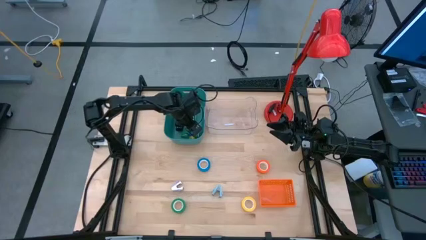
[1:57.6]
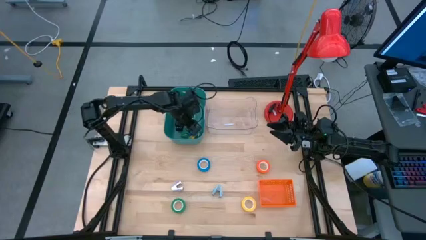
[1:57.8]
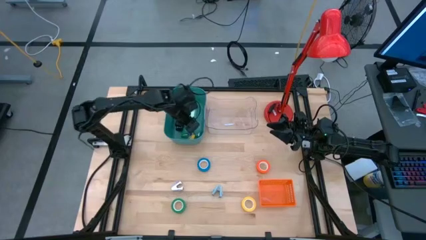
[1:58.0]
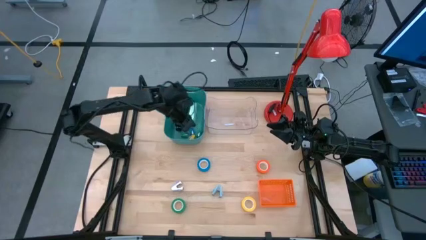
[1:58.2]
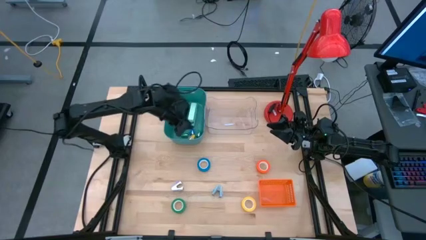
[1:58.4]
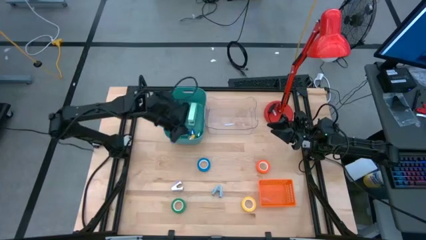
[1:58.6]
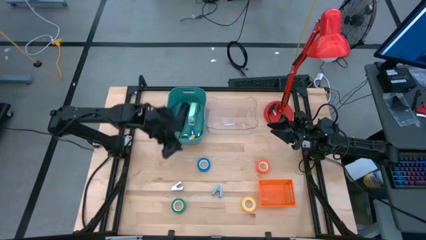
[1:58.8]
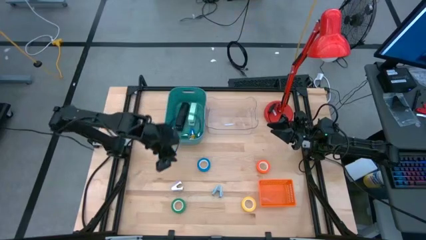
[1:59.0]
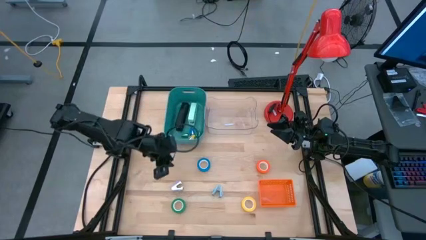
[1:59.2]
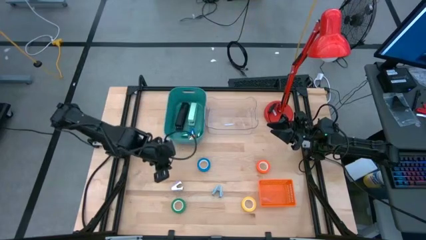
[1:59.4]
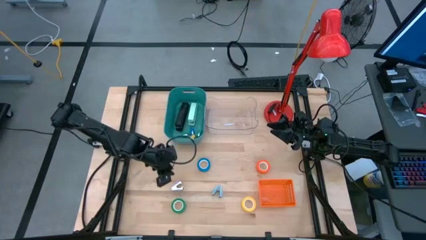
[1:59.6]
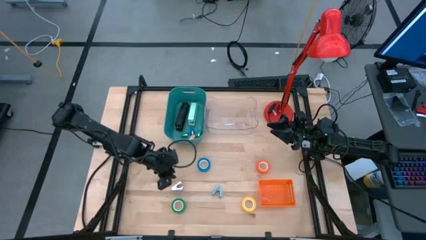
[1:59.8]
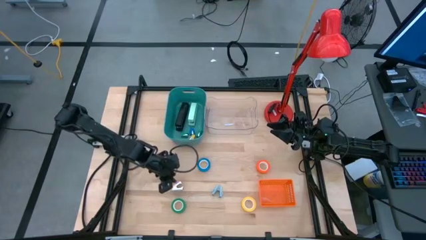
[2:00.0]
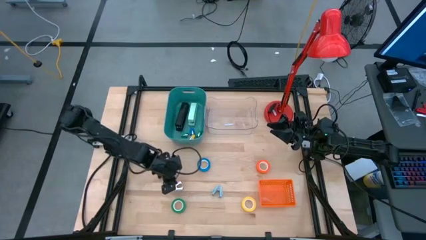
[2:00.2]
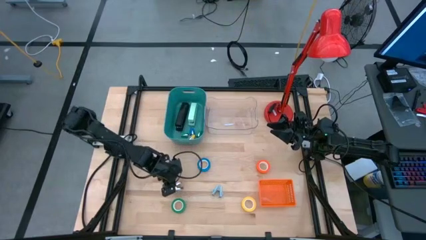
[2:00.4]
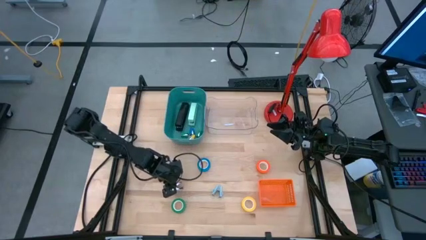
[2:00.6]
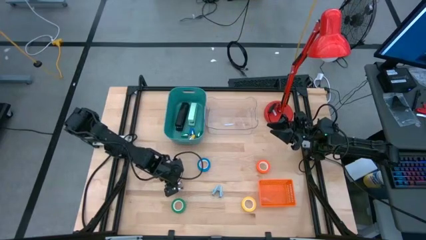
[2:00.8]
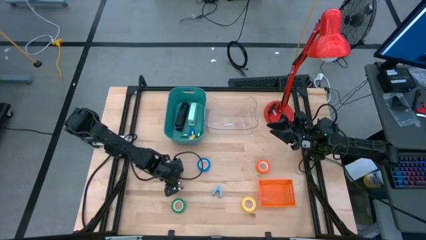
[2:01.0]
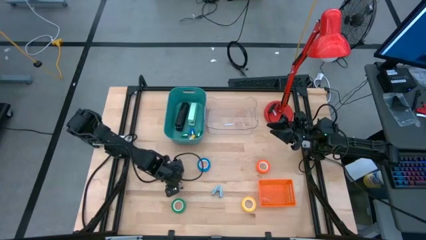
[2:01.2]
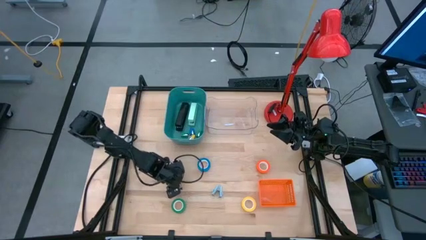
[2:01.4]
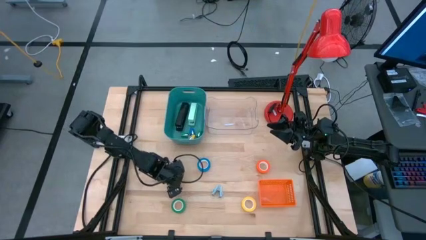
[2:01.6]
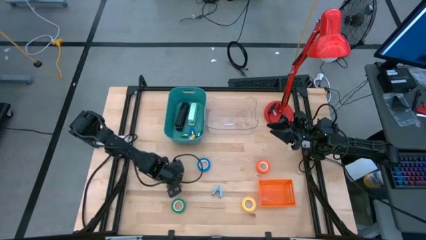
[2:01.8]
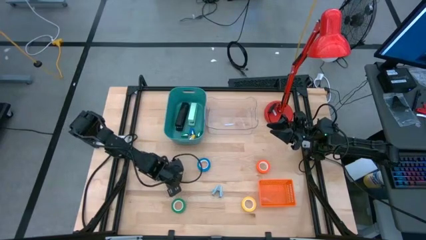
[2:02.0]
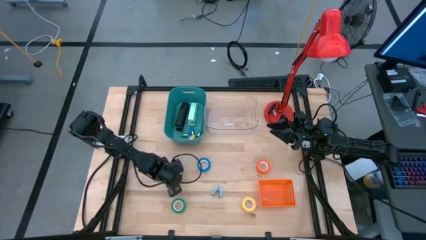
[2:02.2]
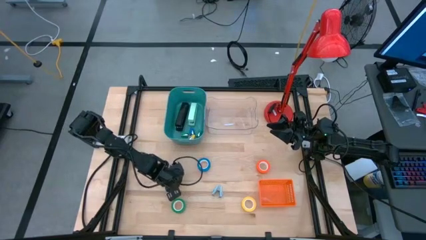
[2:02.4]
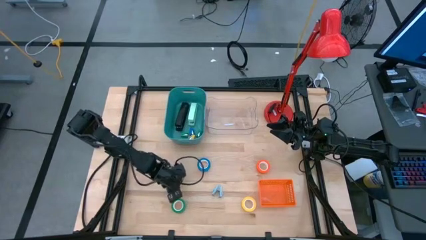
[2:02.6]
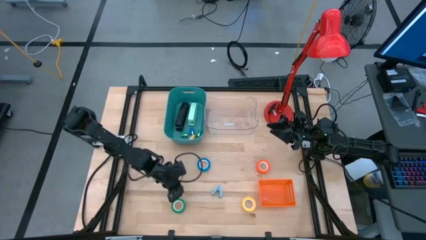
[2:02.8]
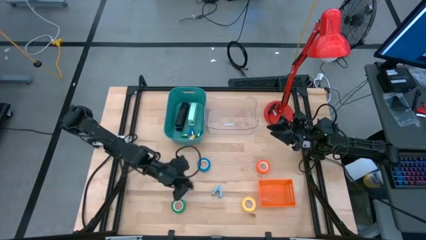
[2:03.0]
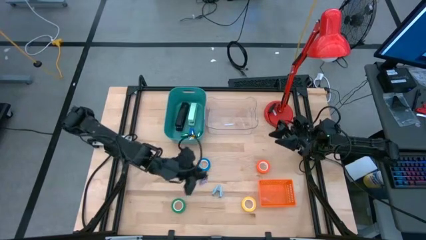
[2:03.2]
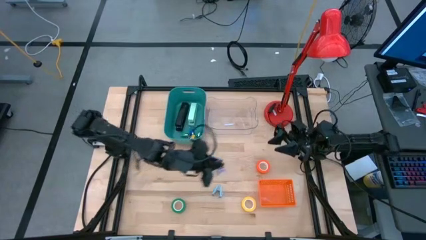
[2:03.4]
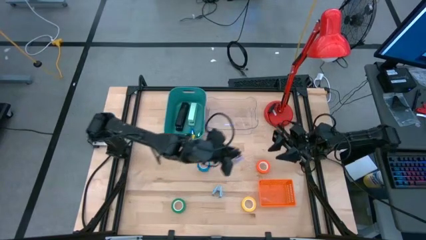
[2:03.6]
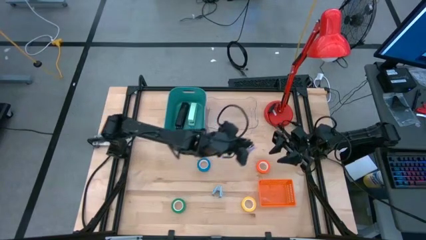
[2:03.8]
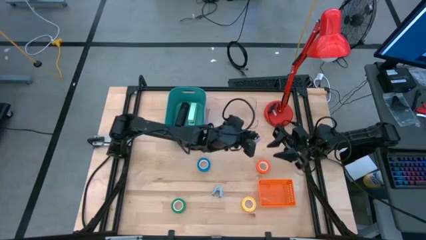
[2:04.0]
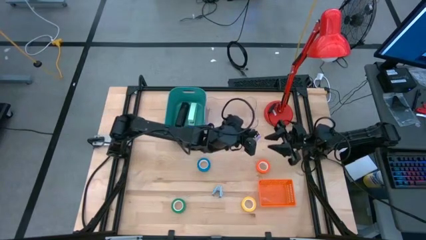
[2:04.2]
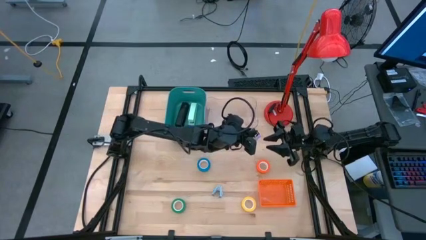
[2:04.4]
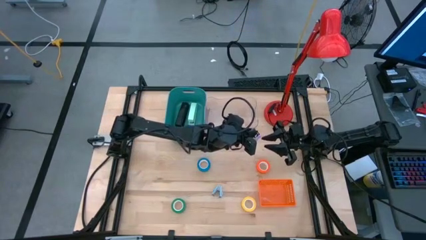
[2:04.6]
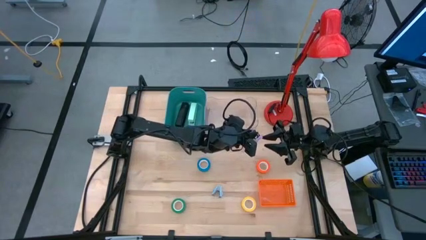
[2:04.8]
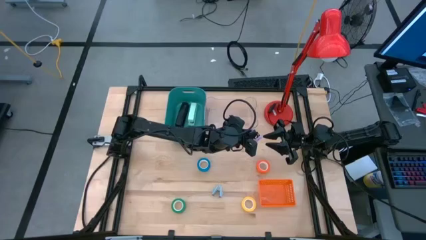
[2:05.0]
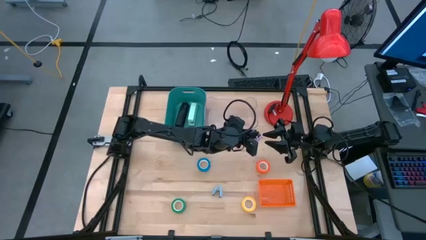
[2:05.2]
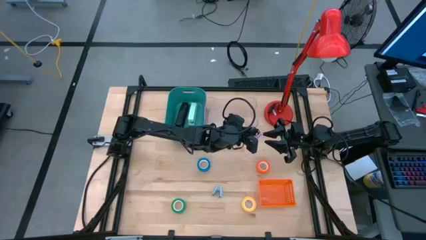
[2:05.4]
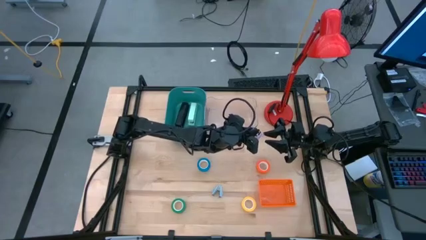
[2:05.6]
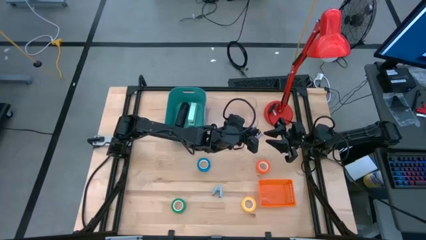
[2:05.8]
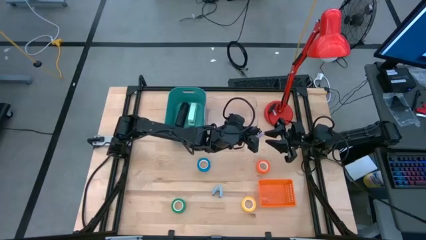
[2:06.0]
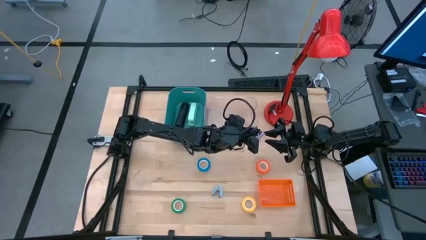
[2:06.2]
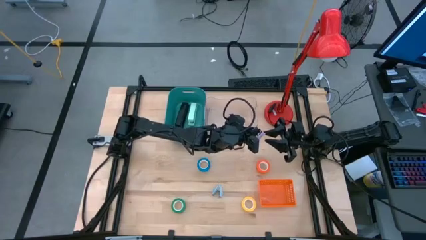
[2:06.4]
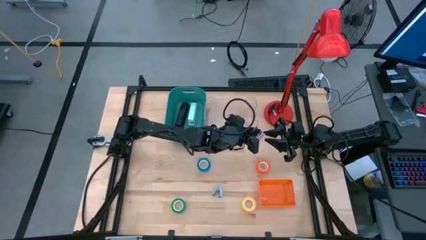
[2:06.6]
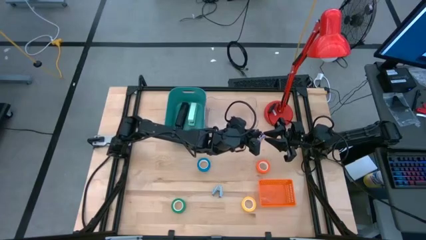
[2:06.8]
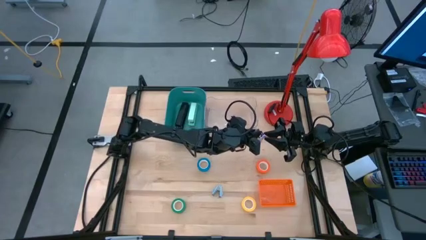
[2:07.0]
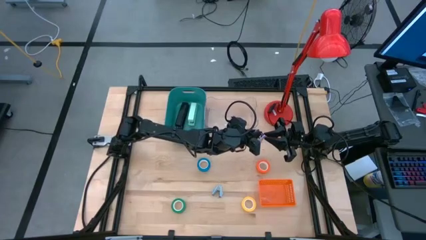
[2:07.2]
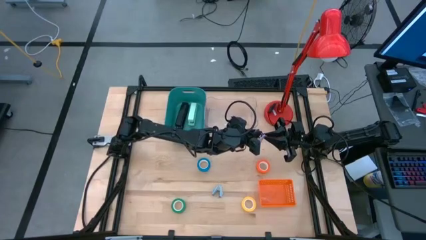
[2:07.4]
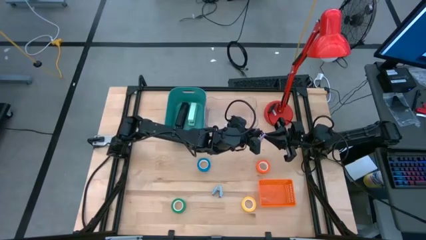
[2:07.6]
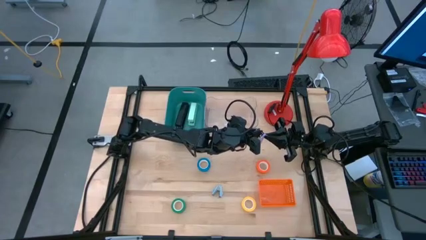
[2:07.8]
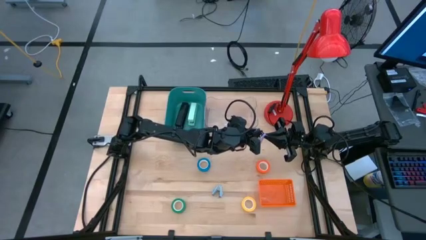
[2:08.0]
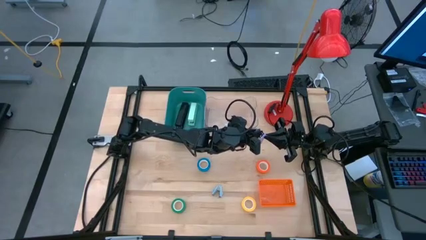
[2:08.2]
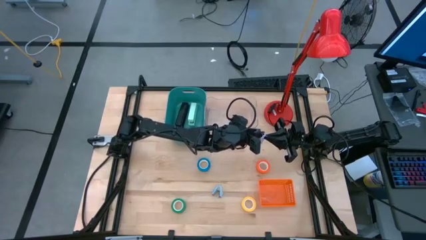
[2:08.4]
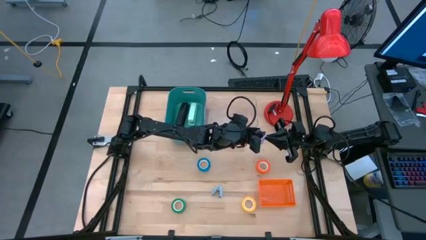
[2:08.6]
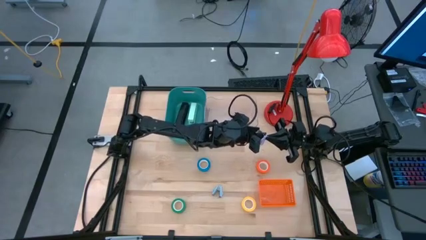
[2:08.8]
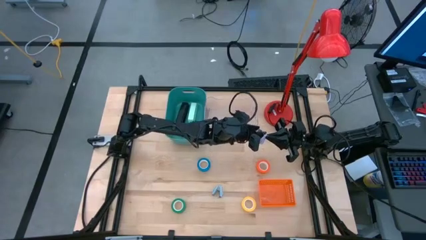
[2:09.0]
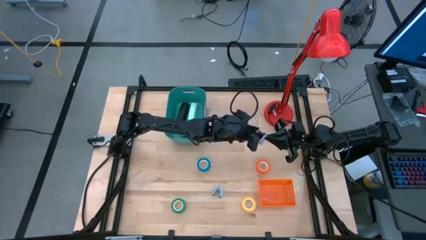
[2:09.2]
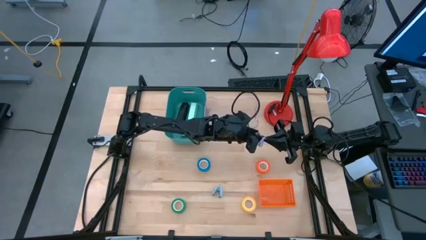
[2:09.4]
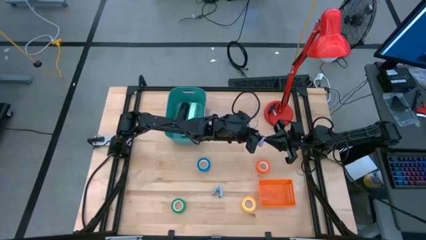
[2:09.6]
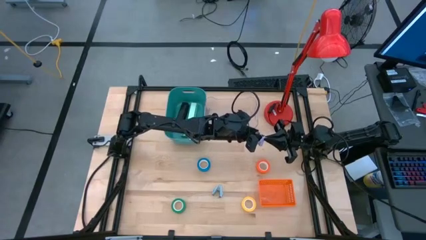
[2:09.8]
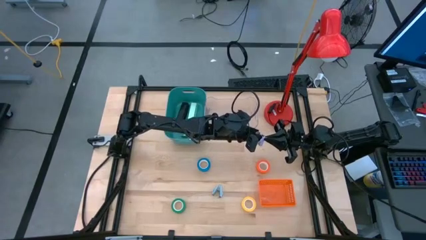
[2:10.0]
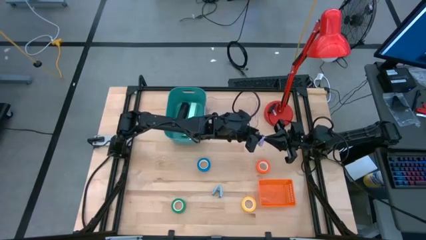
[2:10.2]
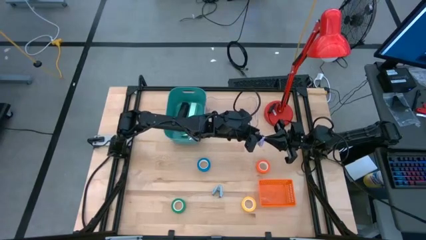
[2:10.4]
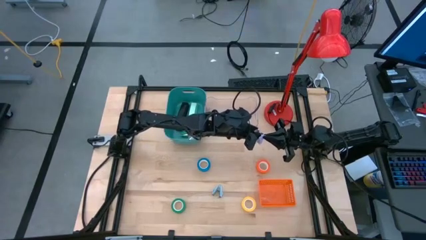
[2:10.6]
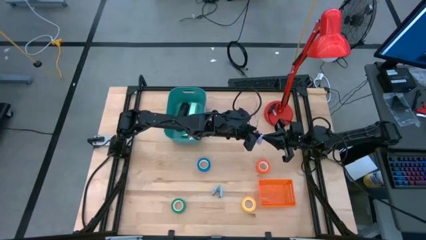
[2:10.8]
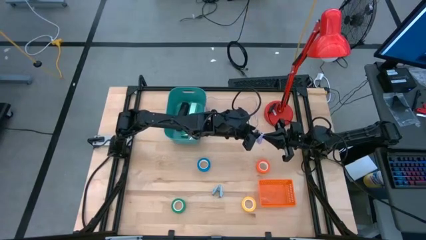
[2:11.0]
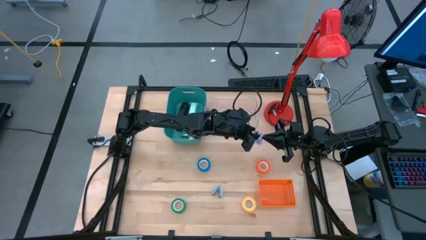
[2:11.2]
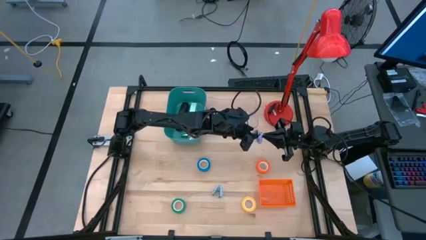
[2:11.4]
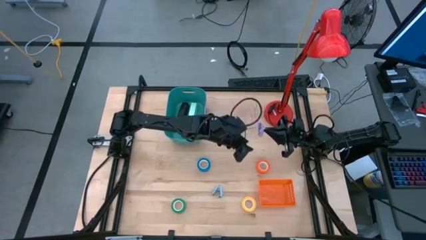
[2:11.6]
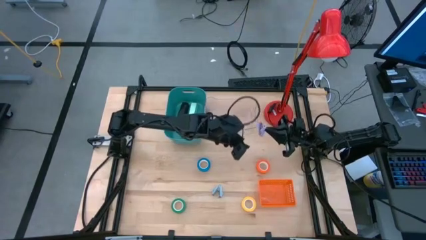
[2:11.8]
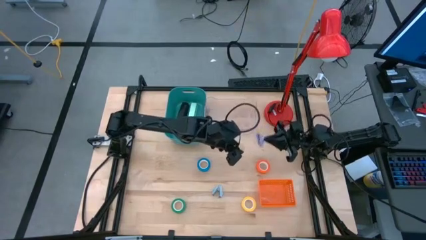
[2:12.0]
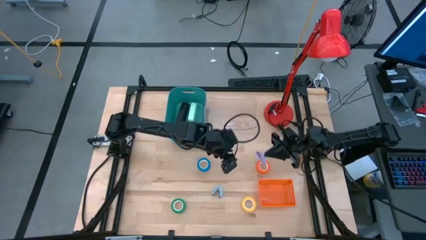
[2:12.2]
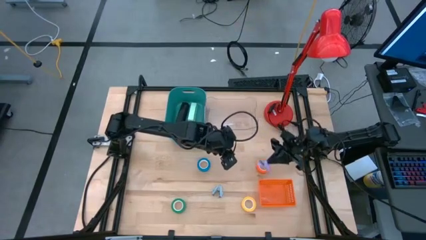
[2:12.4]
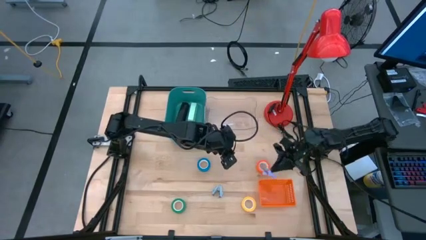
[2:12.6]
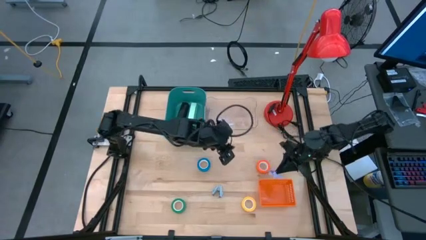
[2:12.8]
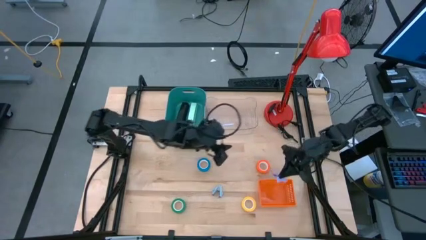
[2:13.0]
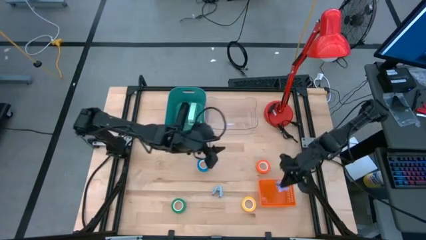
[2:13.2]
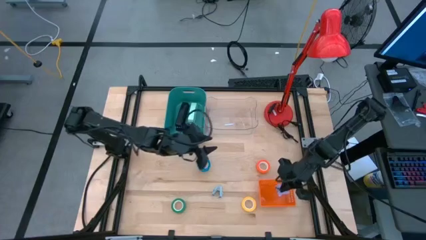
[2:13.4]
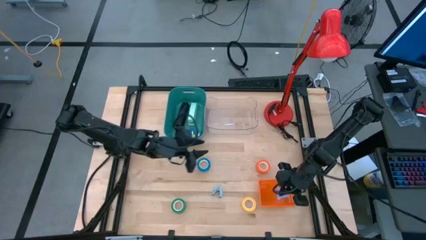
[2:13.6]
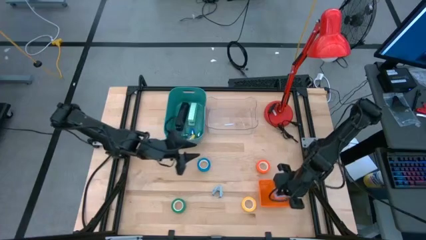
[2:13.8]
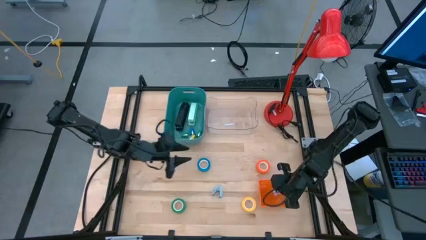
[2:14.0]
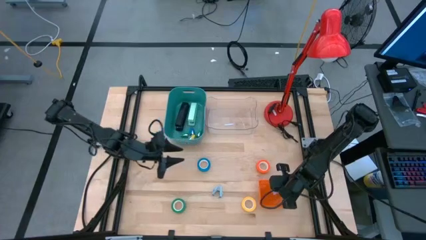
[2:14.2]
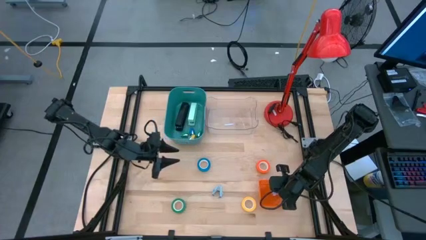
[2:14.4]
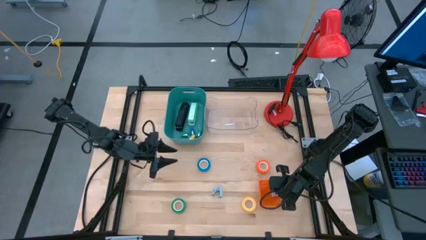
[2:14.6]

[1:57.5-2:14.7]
Task: Pick and place Stapler, Stapler remover, tape
Put the purple staple remover into the orange bin
